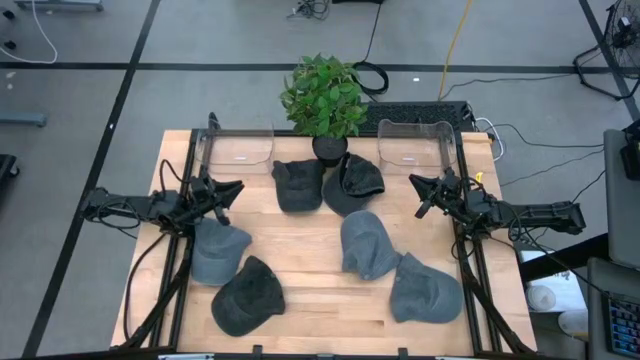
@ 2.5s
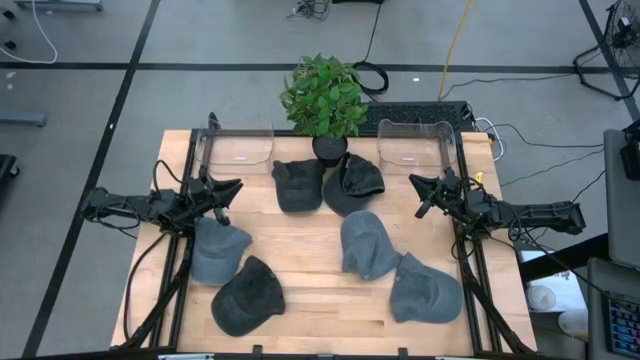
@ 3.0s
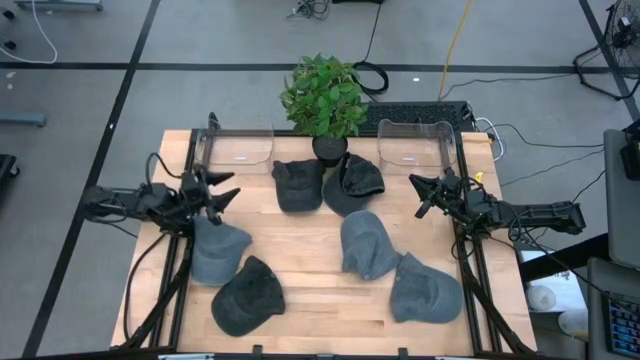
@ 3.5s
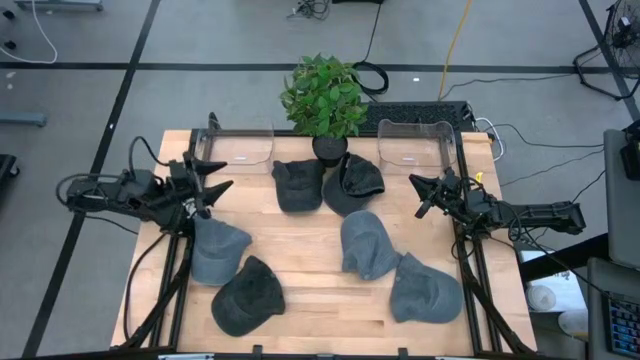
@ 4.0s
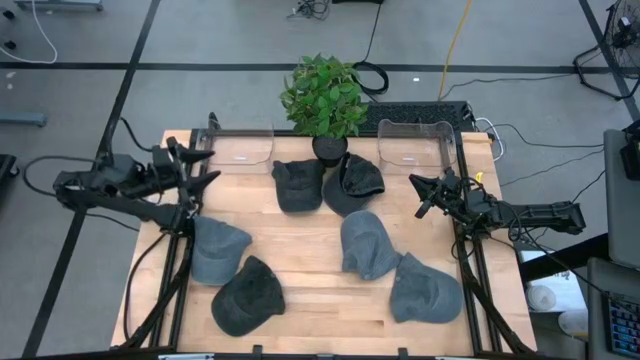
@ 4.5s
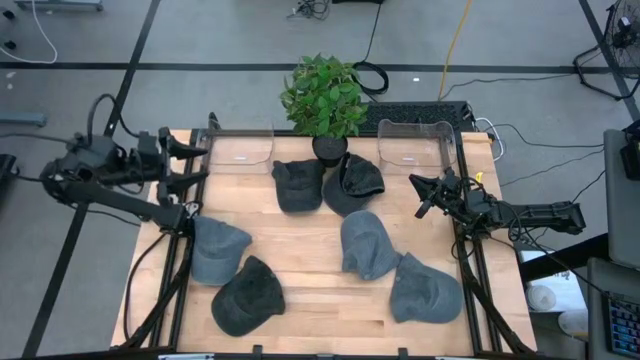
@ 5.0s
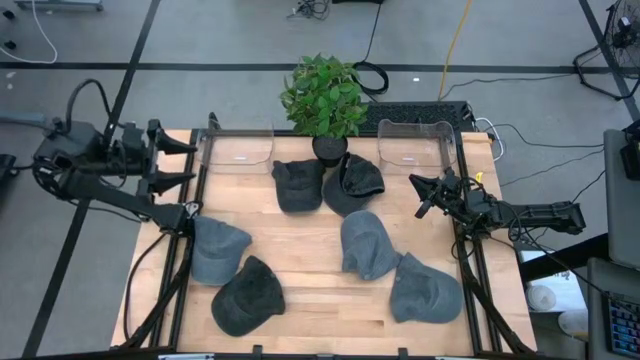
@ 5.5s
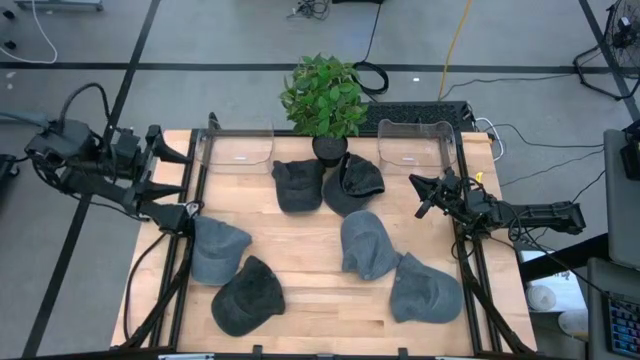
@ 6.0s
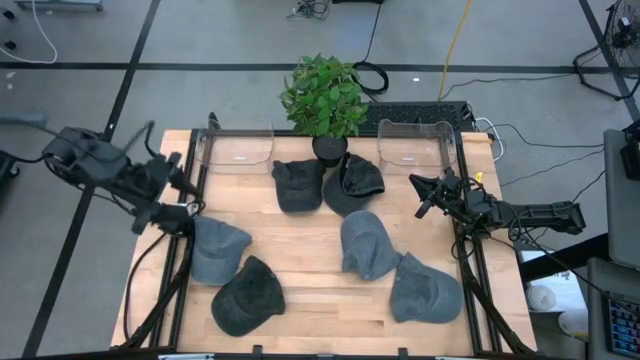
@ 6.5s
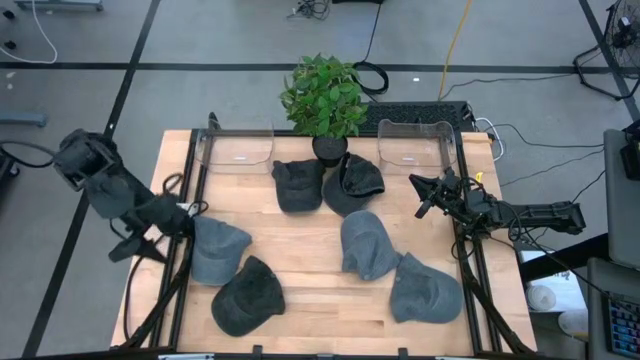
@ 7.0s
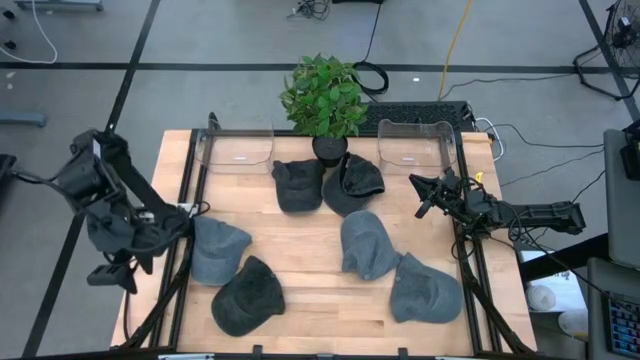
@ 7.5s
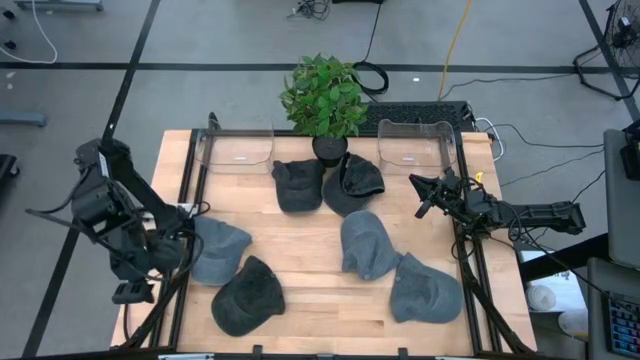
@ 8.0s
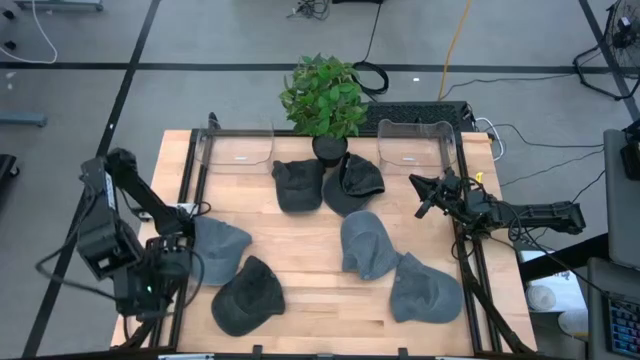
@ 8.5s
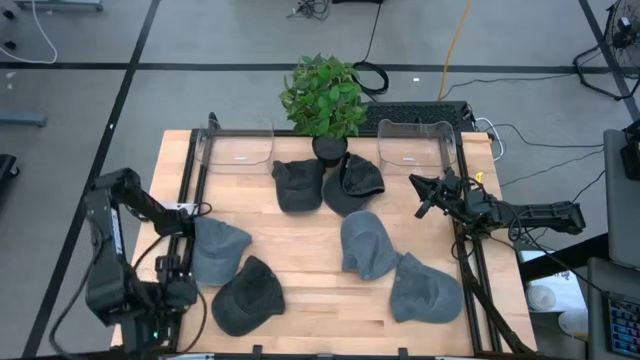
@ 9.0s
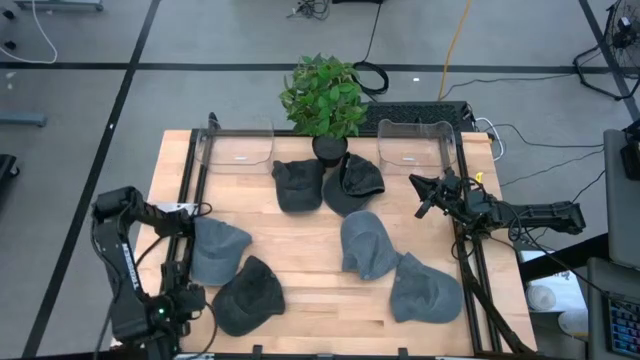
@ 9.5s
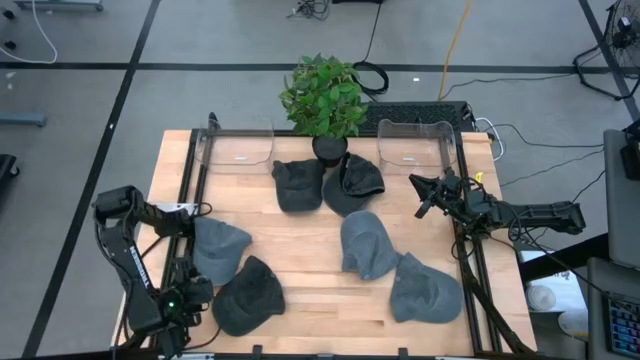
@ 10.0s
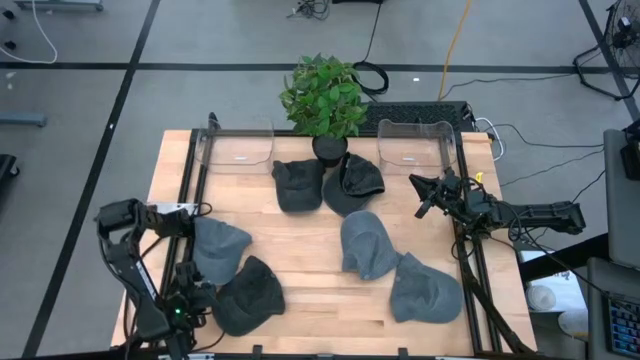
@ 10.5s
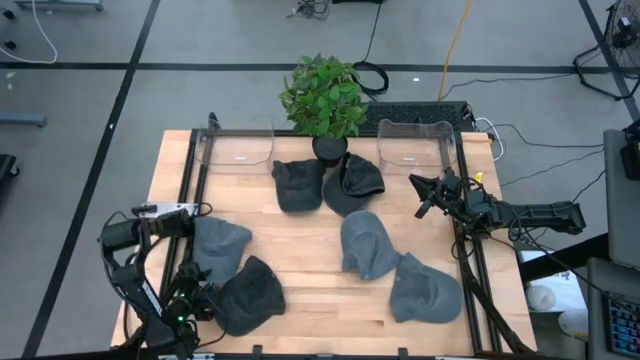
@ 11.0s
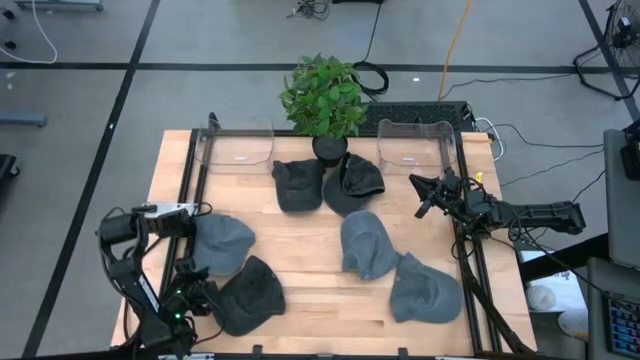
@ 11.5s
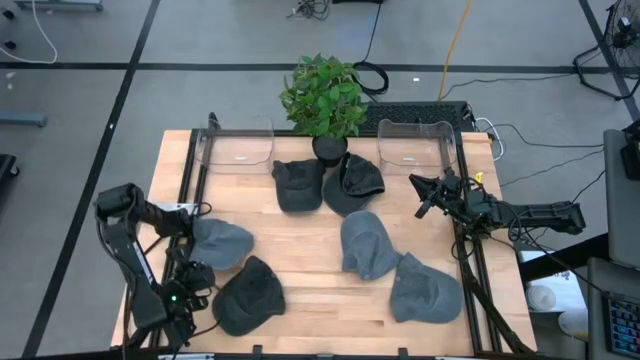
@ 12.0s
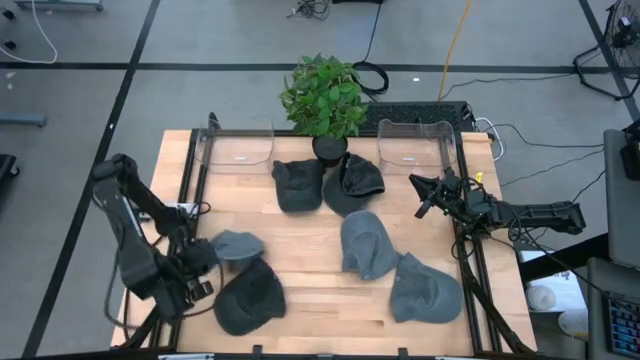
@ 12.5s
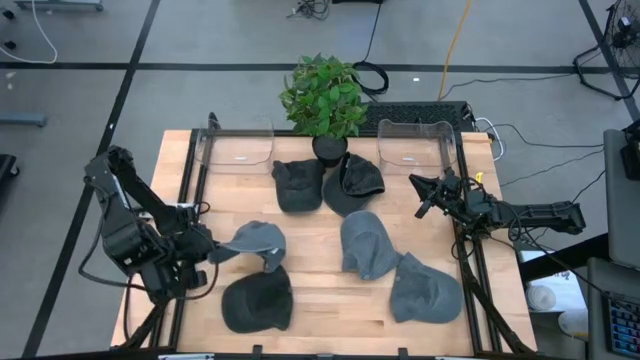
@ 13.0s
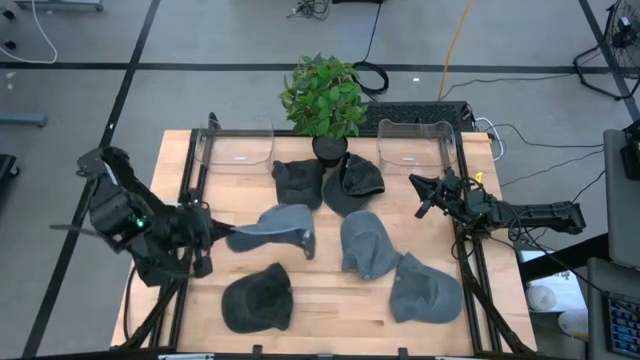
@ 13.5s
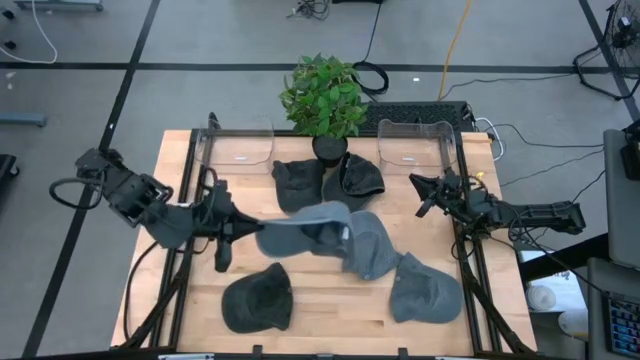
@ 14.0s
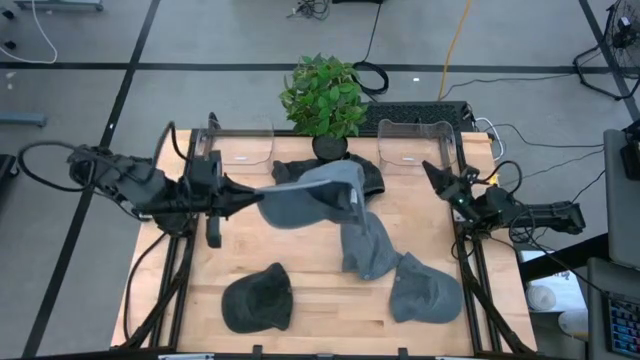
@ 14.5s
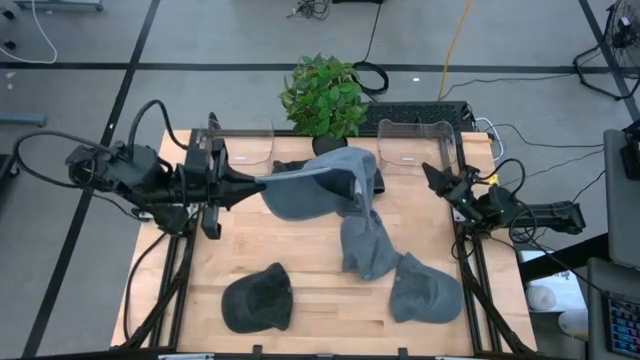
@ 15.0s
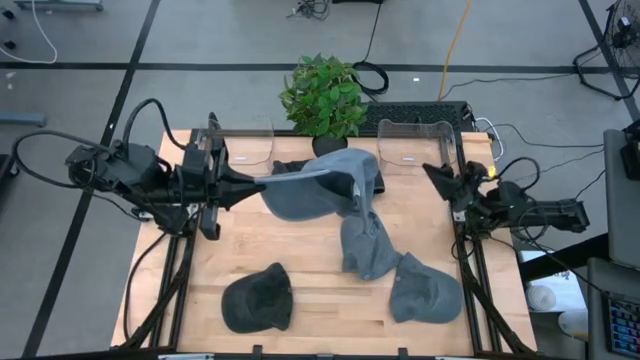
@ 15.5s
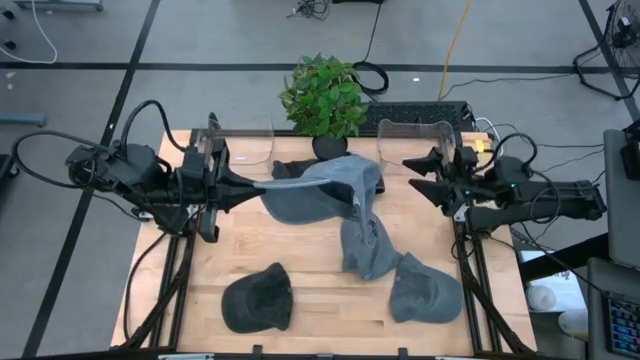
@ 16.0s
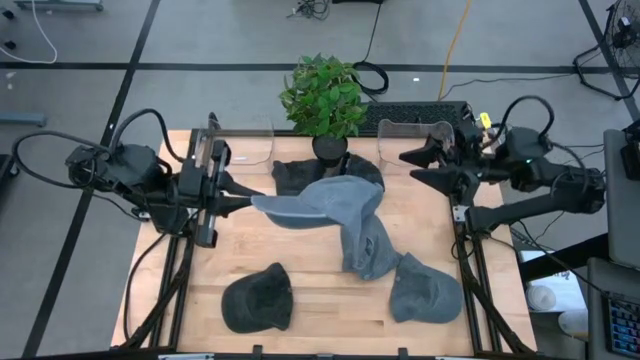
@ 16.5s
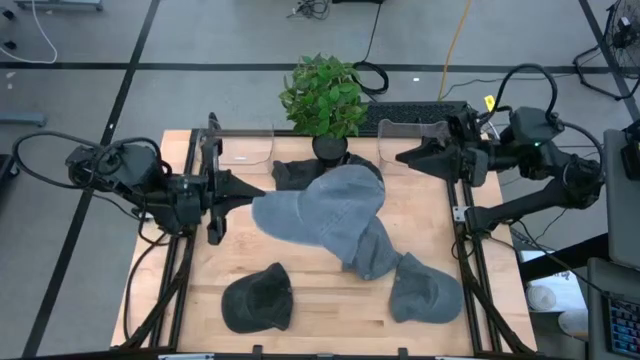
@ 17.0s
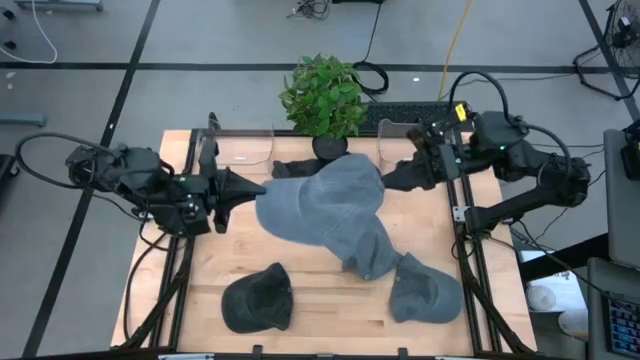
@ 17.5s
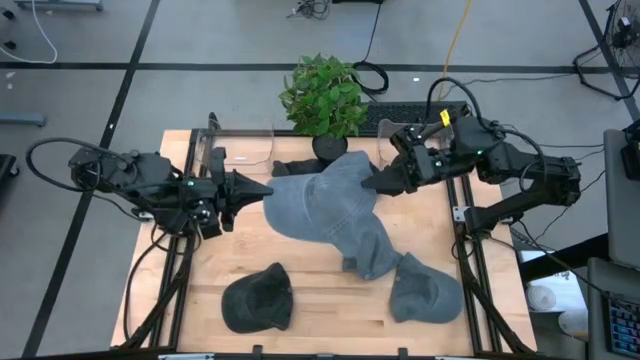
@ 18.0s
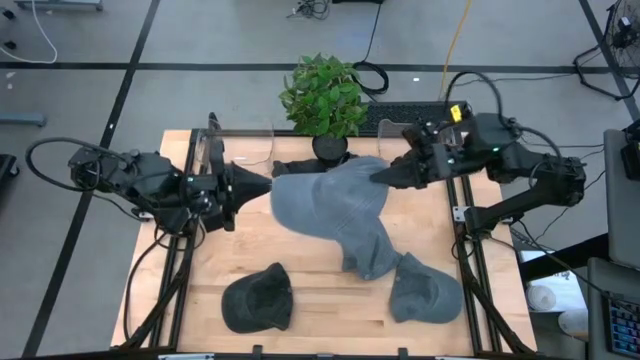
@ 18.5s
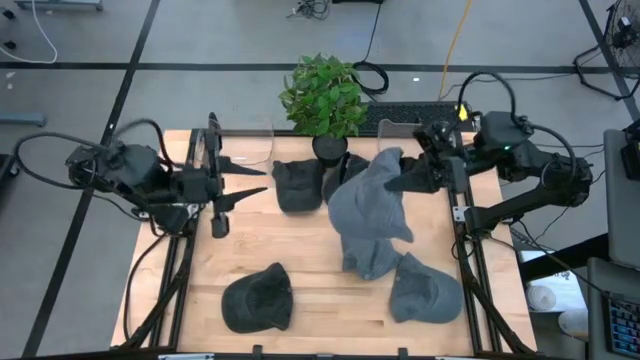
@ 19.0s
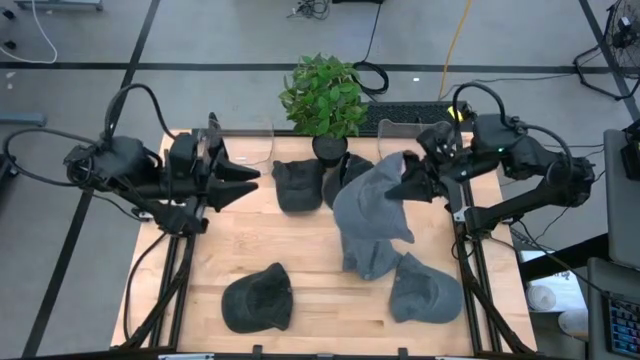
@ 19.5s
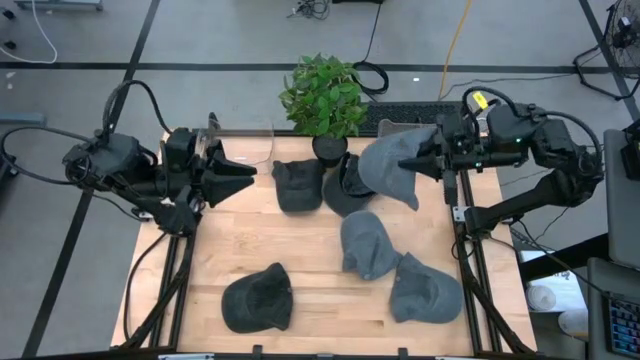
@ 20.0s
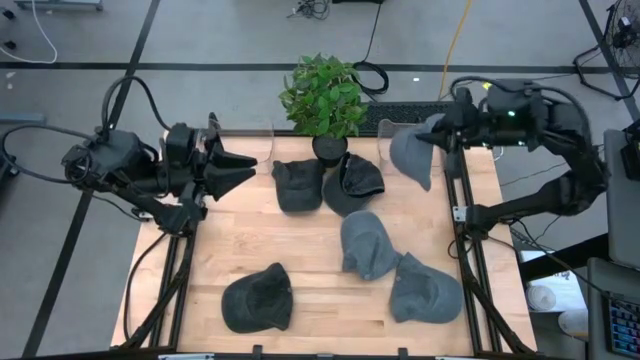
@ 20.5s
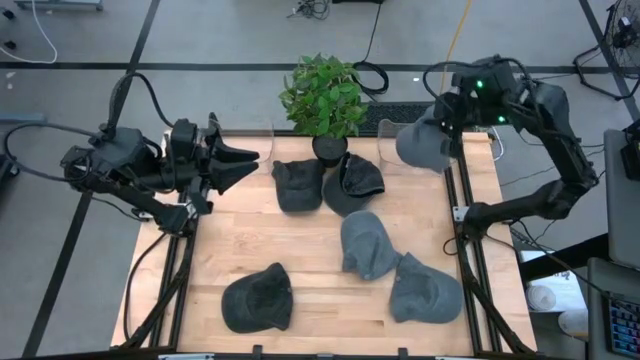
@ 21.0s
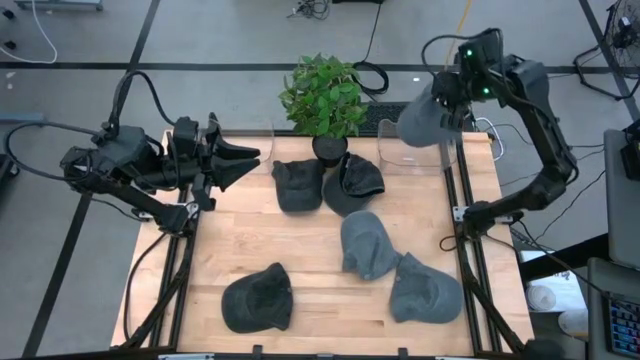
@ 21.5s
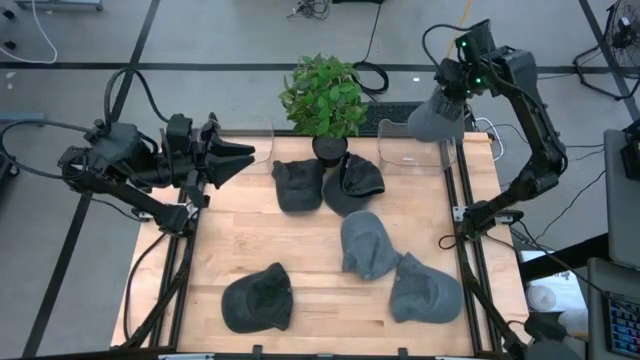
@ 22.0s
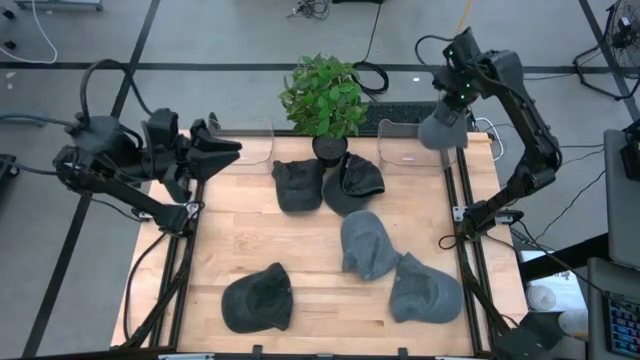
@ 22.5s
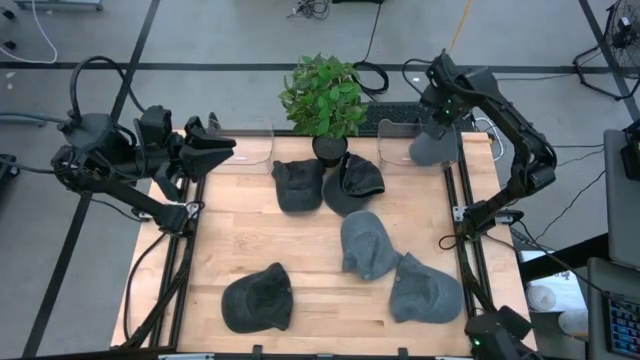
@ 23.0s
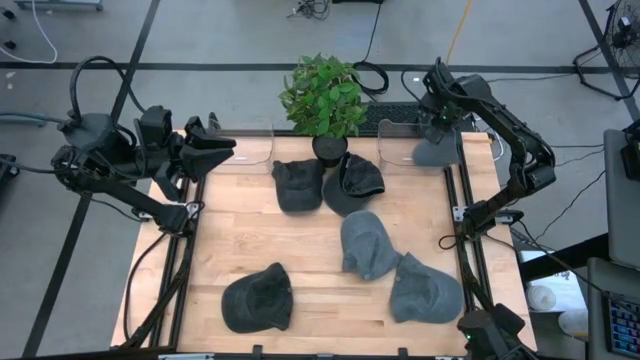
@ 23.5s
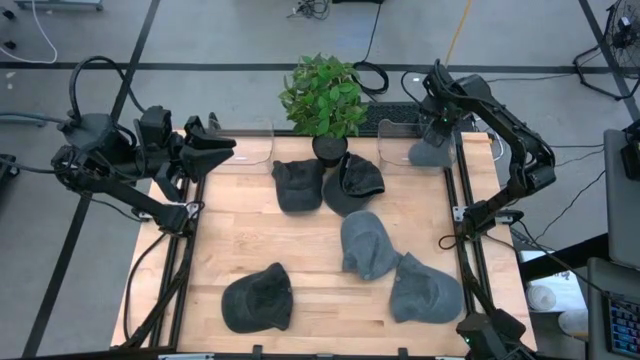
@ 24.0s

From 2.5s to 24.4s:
Task: Pick & Place hat
Put the top left gray cap into the right transparent bin
